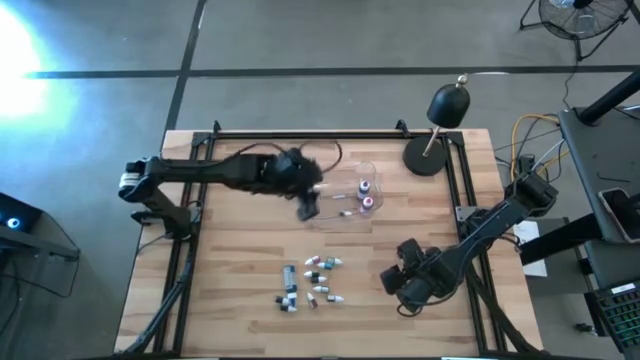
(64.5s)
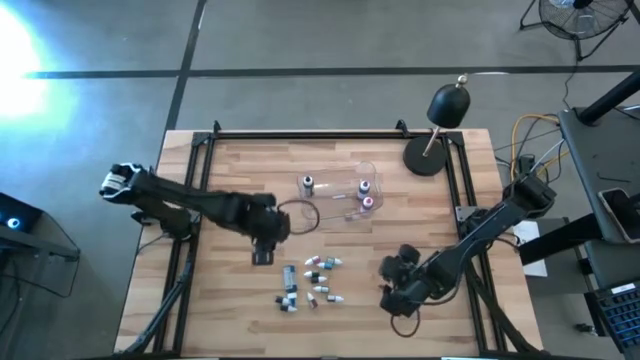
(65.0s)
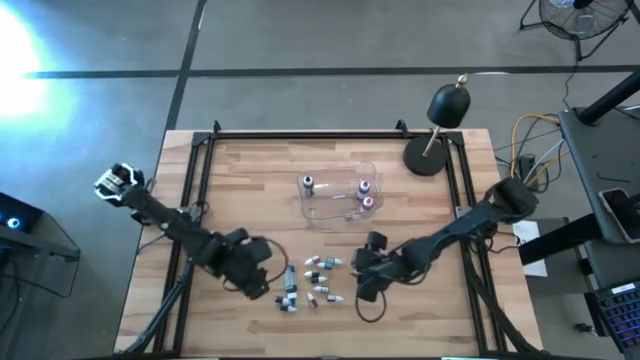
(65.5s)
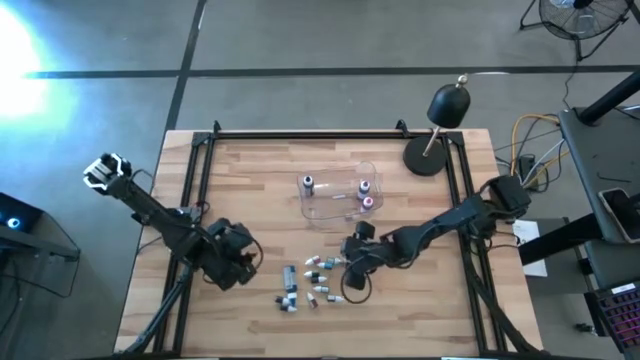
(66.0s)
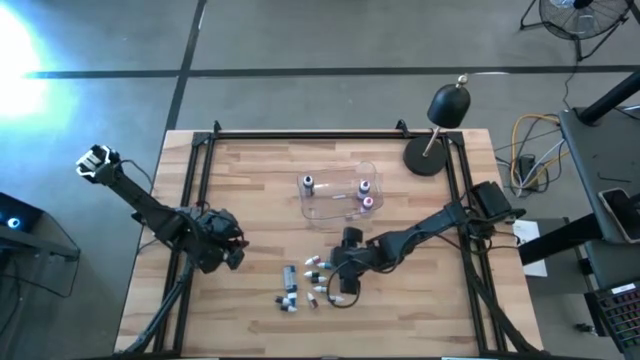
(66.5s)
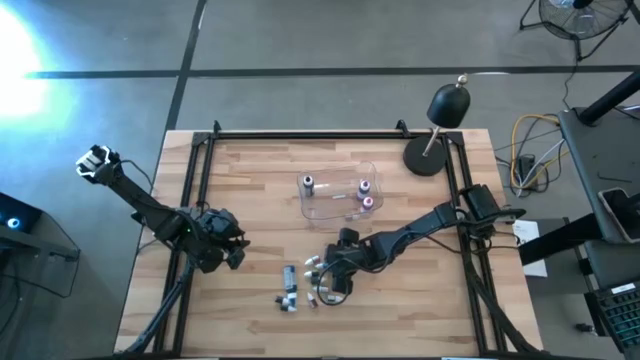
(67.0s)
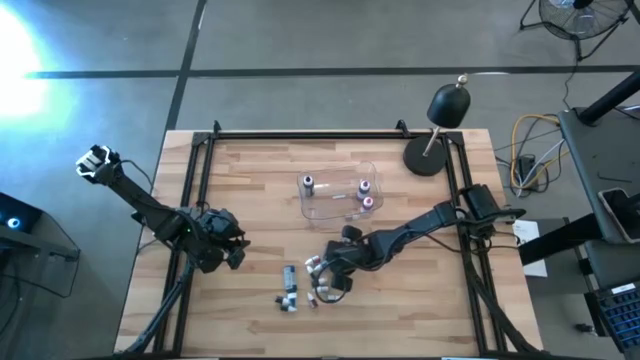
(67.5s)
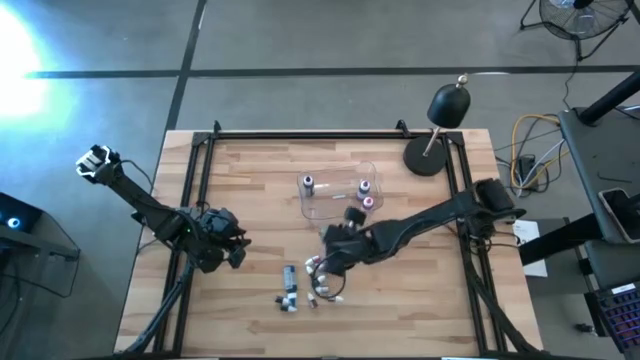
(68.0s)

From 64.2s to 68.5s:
Task: Pick & Place food coloring
Put the top small green food coloring bottle into the transparent bin

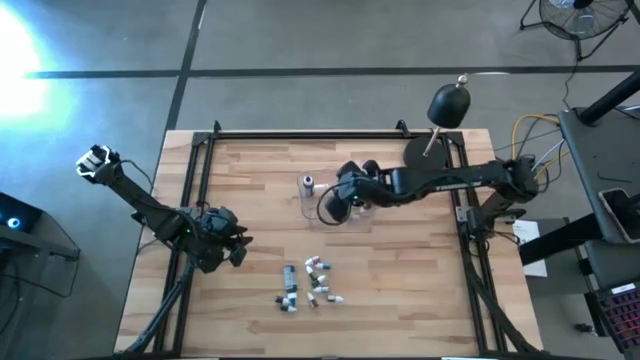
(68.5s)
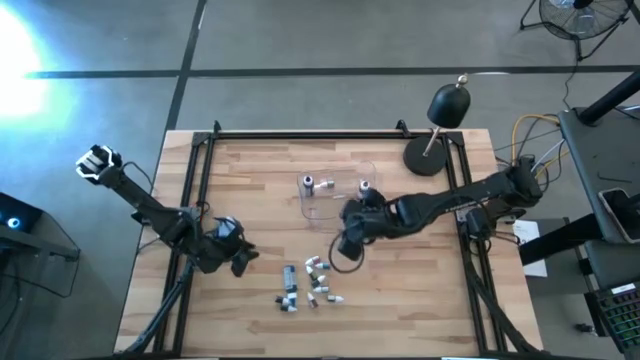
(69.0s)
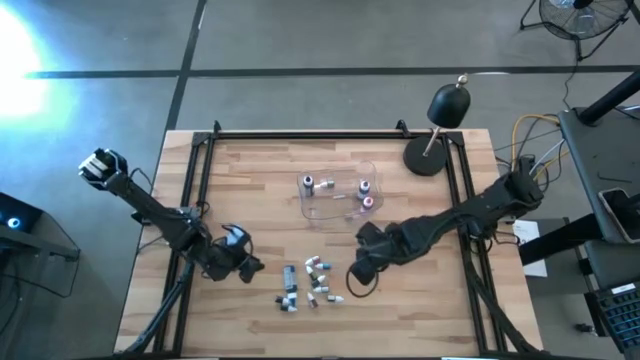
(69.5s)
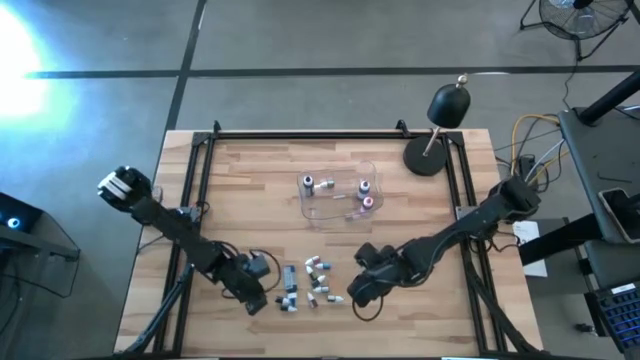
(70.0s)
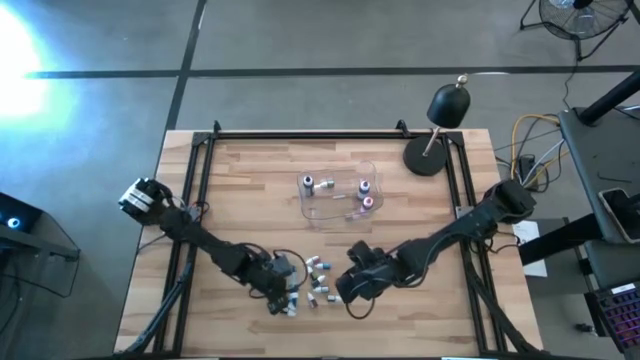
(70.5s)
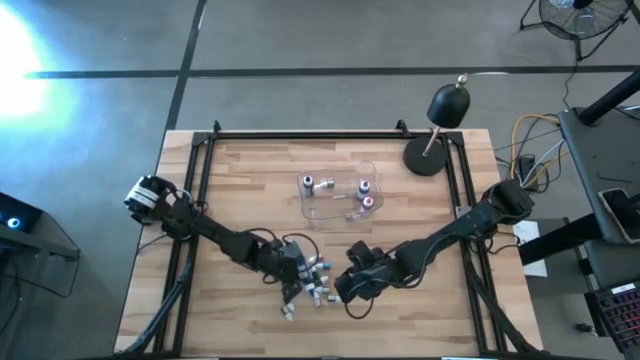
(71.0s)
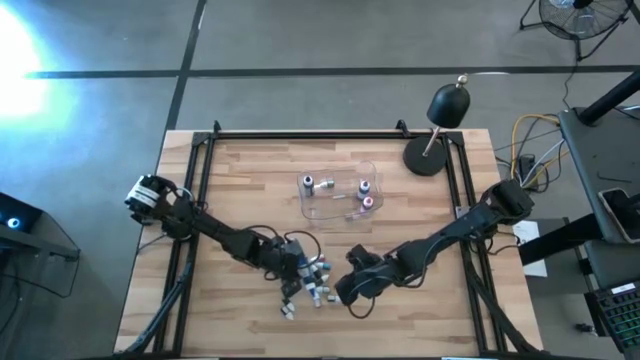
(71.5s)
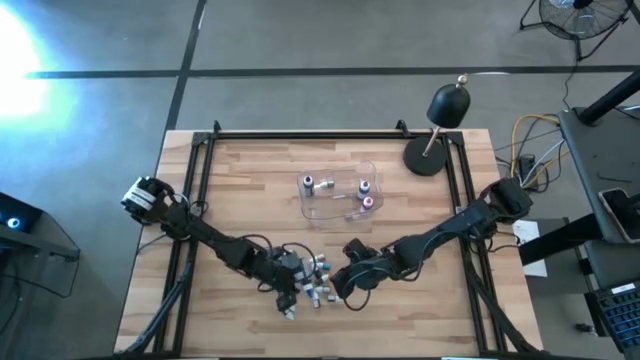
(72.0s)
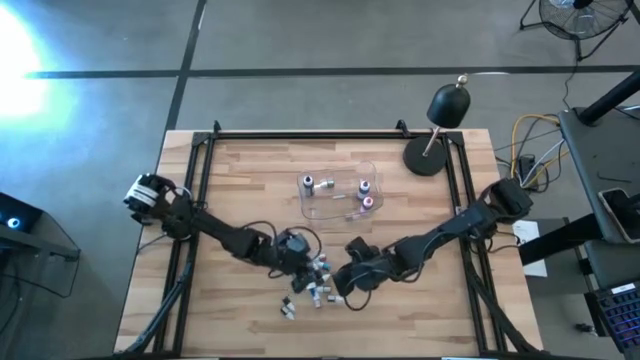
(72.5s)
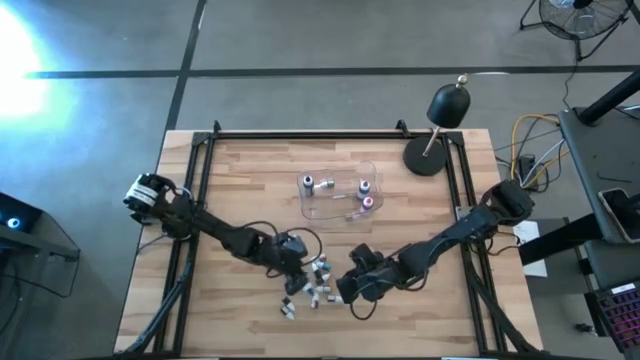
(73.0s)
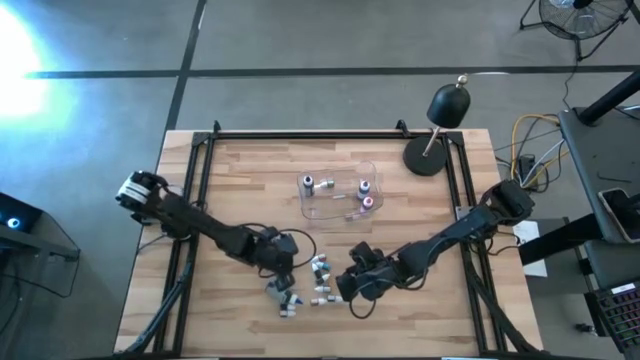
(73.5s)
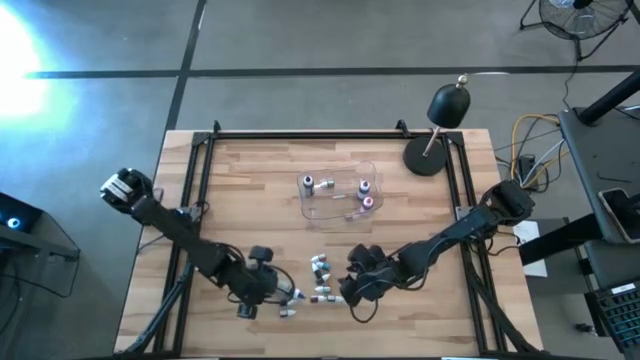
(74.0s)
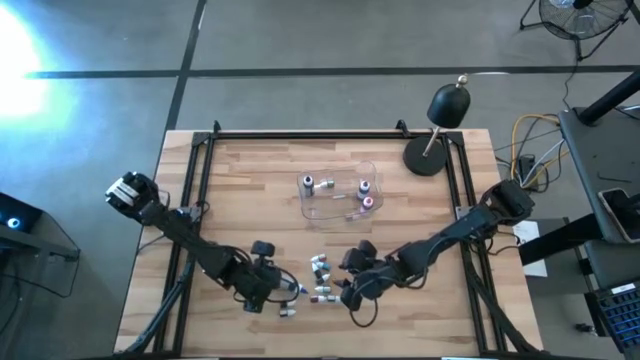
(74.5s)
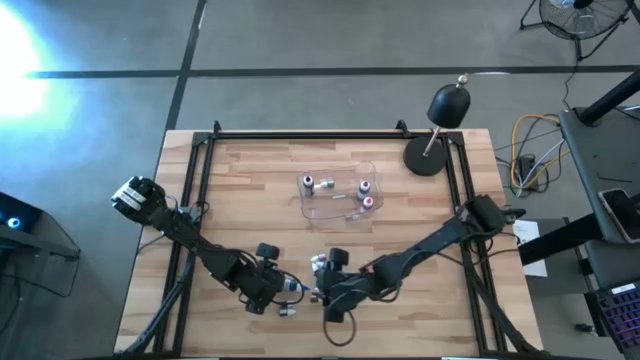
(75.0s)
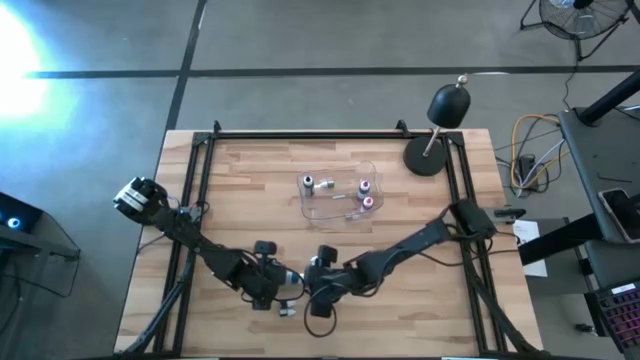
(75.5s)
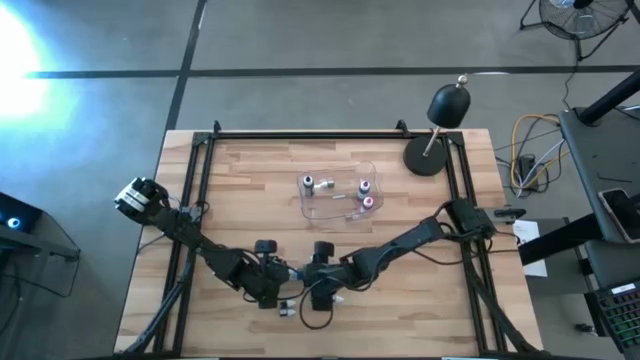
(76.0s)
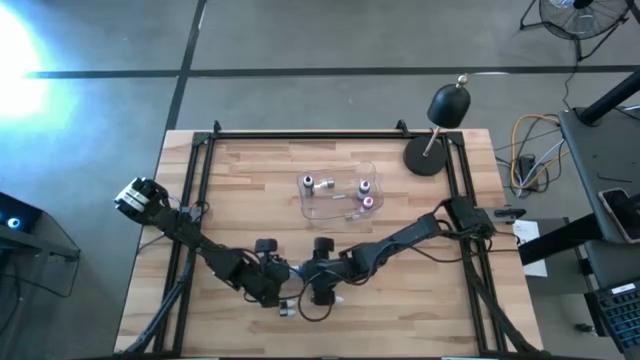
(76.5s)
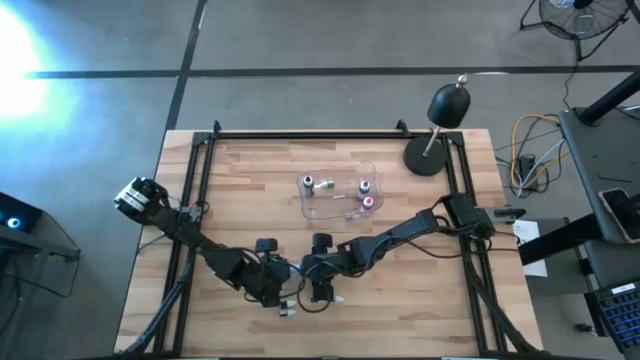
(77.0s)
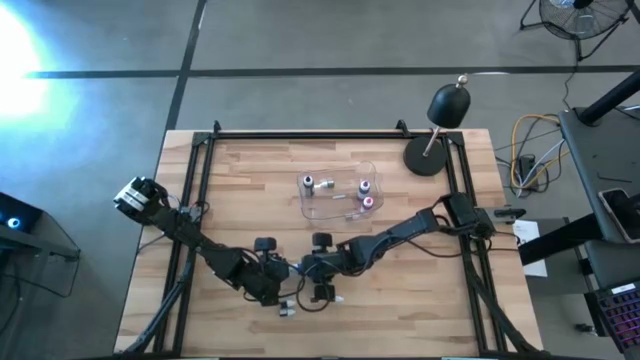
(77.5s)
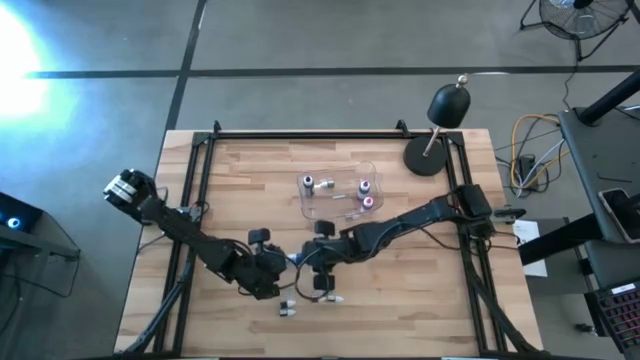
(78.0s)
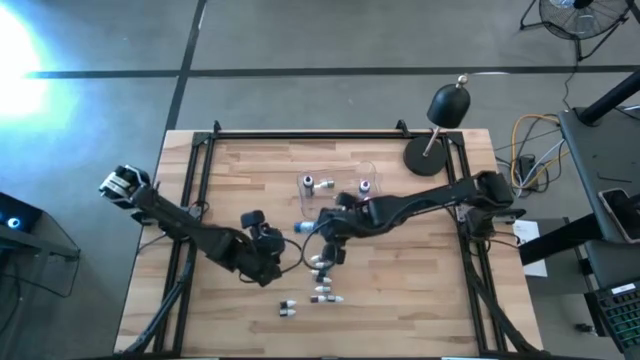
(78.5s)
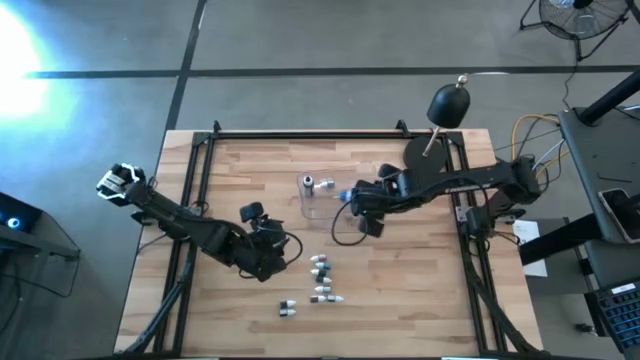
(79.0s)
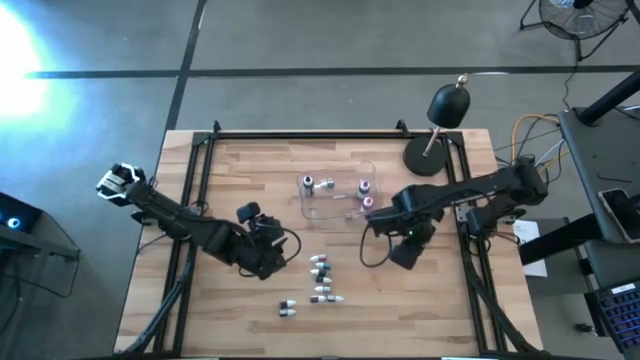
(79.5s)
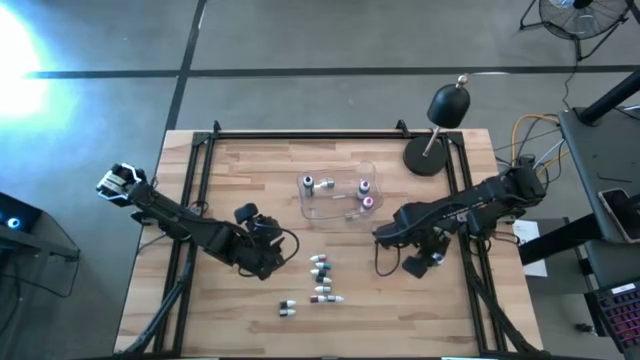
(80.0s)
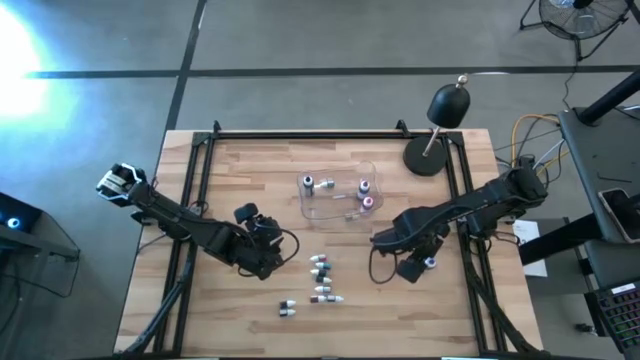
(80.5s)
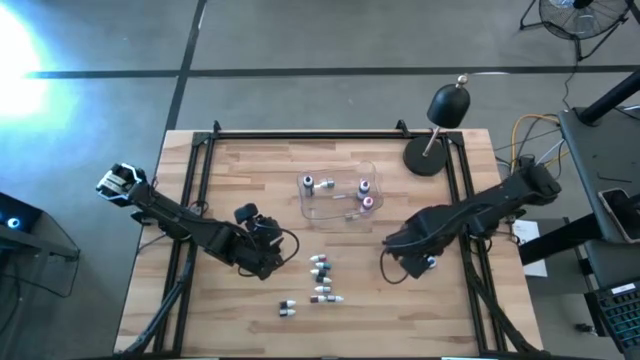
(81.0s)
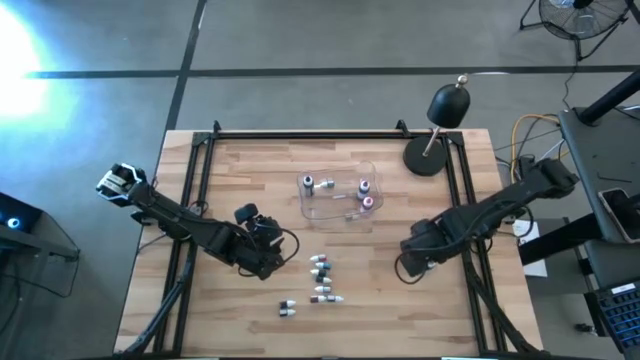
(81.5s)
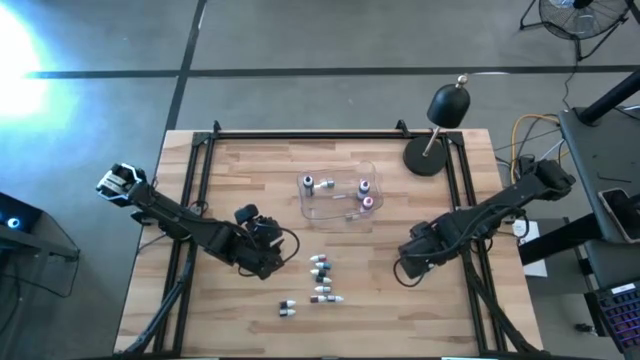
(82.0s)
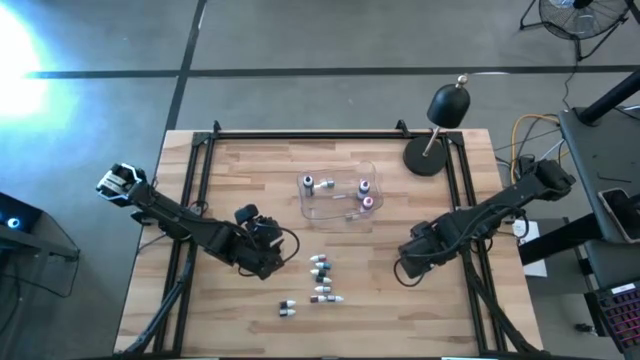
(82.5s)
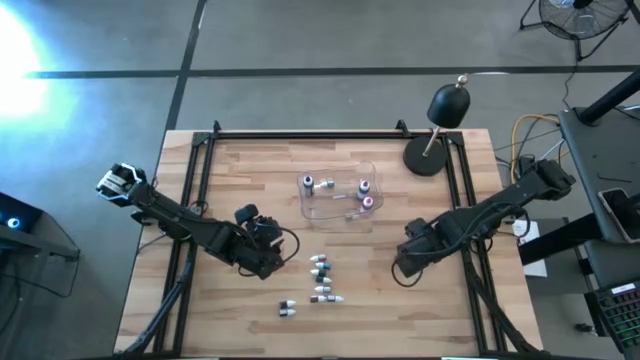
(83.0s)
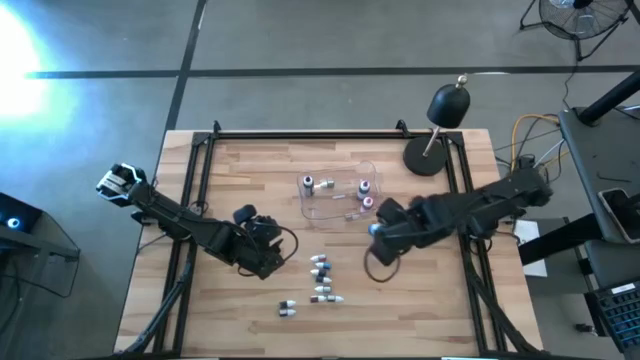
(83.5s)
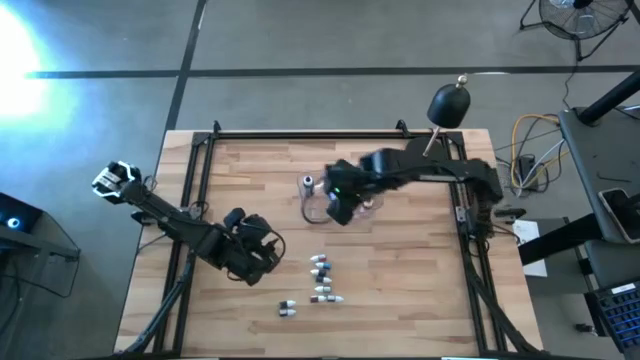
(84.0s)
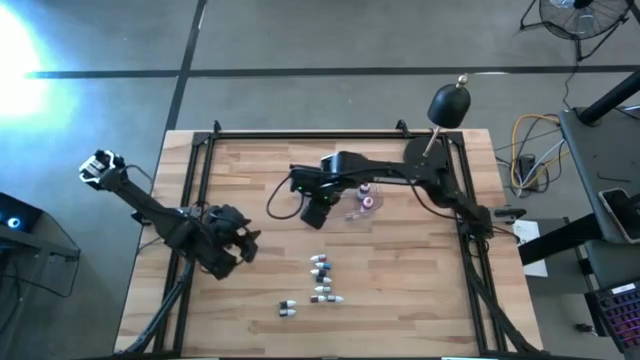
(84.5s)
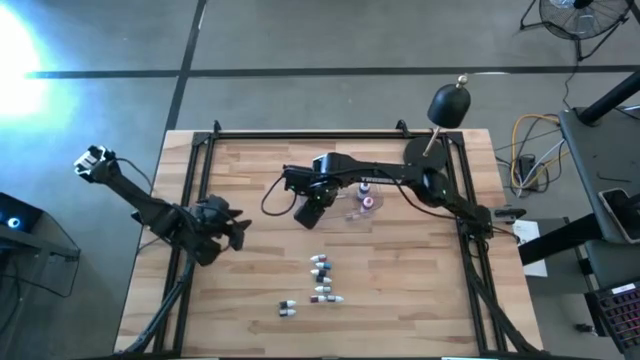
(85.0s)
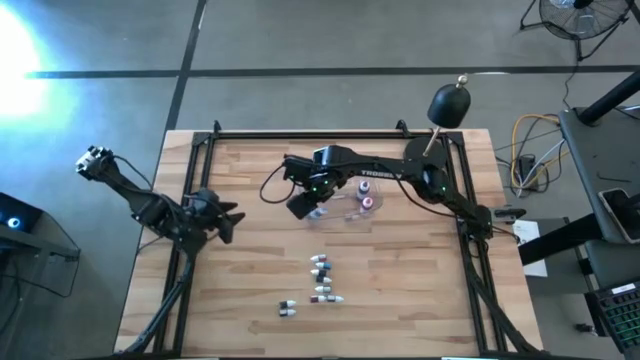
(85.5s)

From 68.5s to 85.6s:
Put the large blue food coloring bottle into the transparent bin
